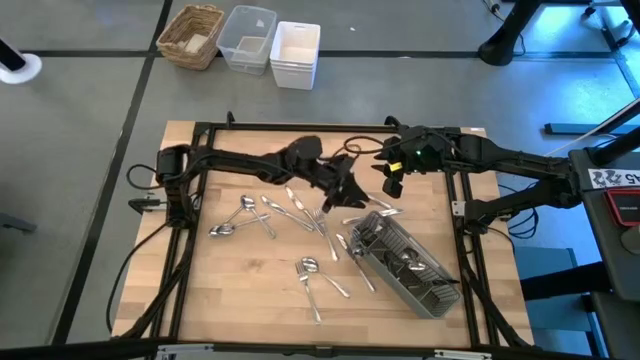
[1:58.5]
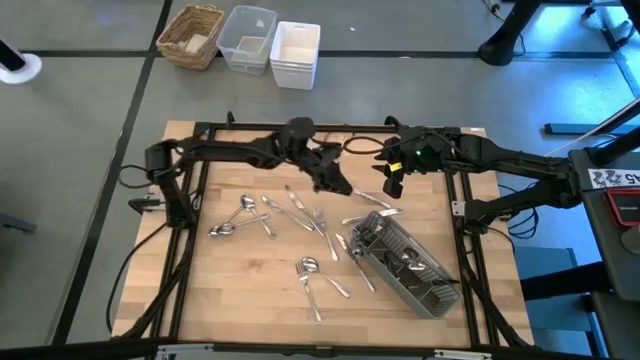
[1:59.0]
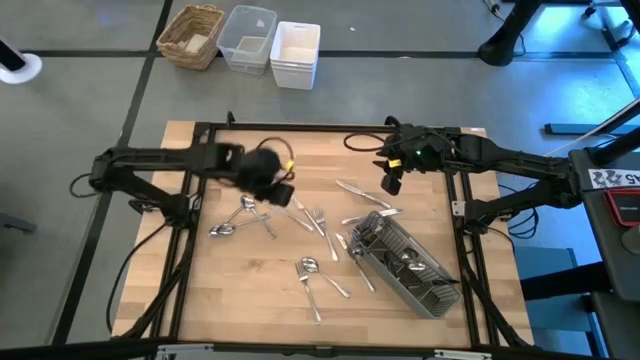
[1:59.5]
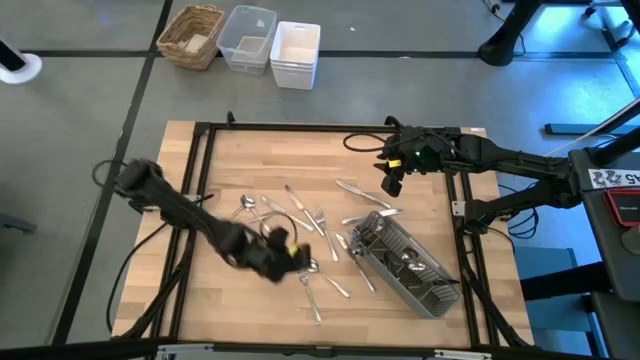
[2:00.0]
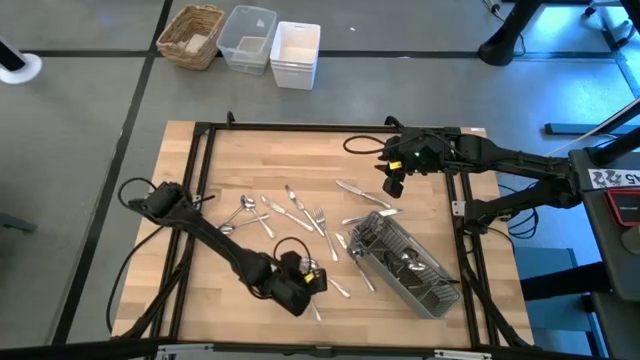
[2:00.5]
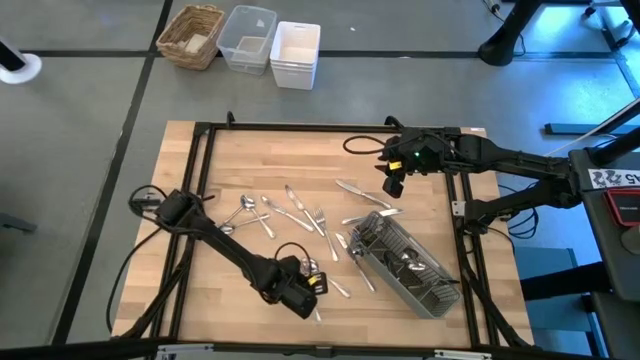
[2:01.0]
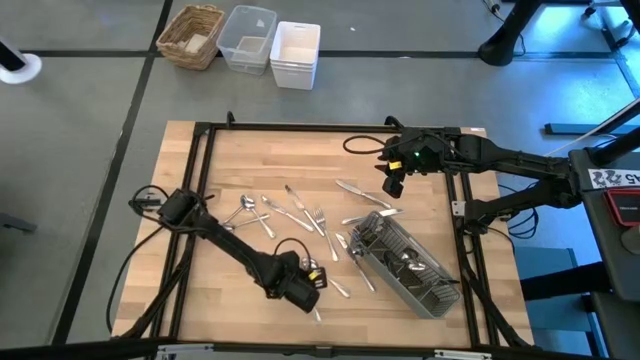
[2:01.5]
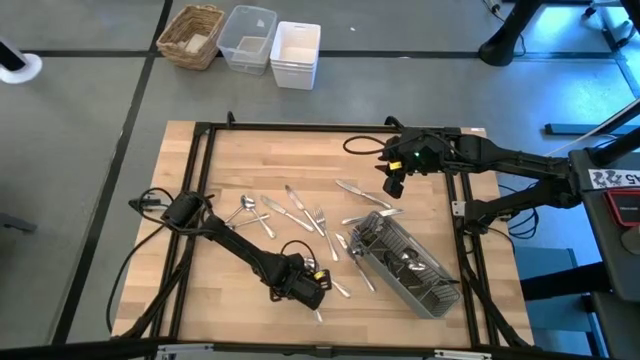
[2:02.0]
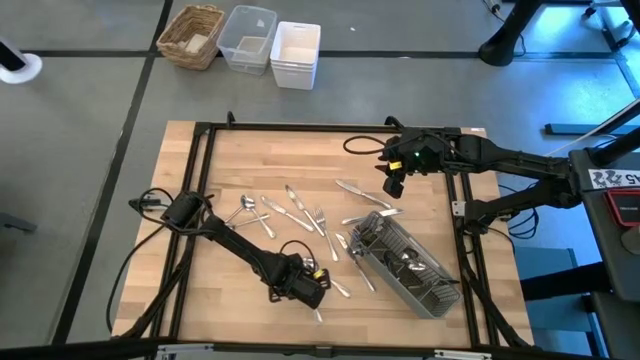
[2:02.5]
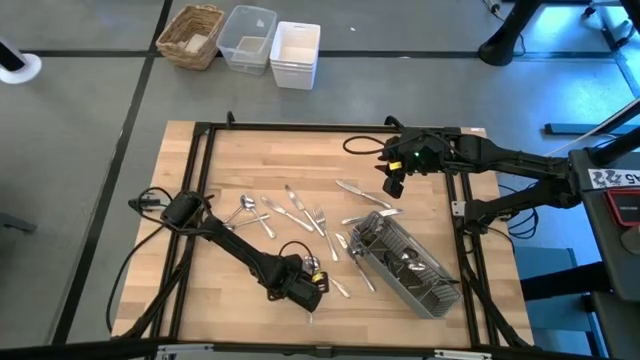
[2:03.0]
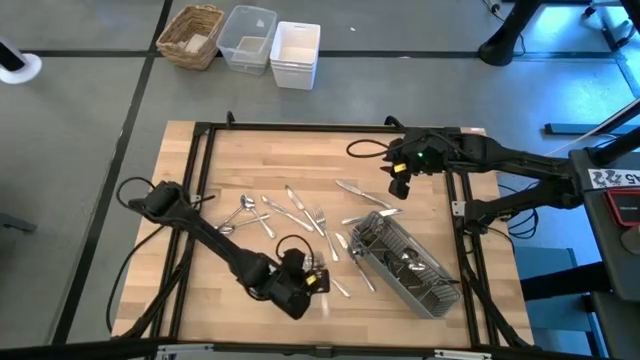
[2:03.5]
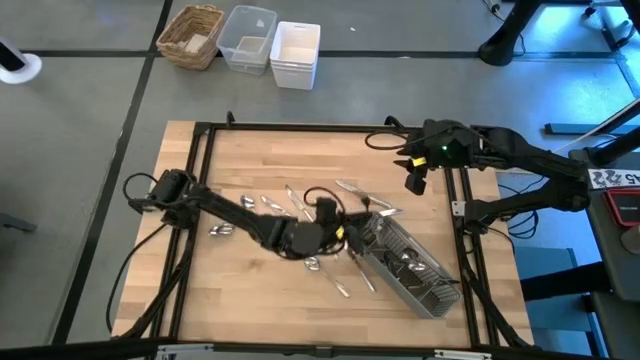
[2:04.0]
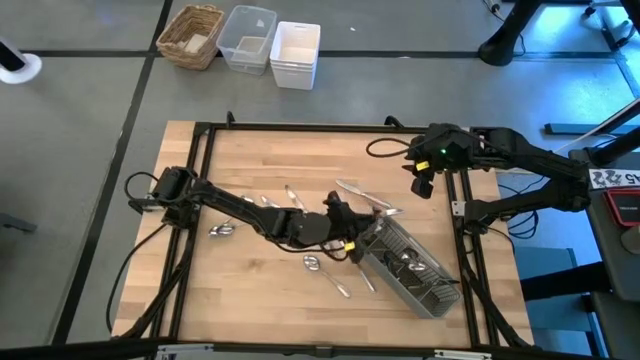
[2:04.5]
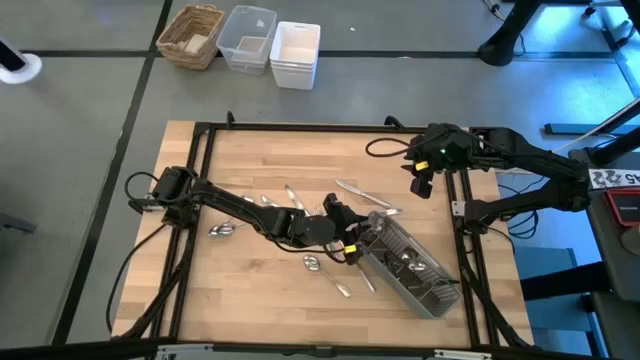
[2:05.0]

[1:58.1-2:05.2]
Task: Sort silverware
Put the silver fork into the gray silverware basket

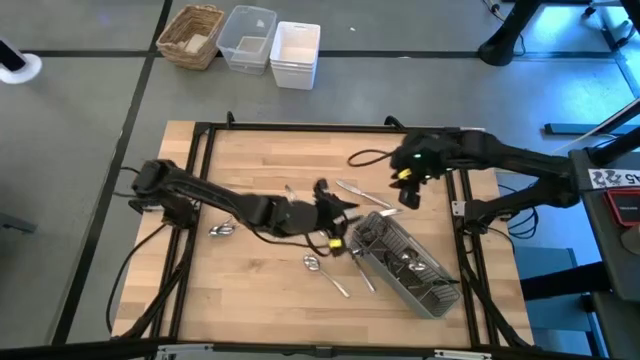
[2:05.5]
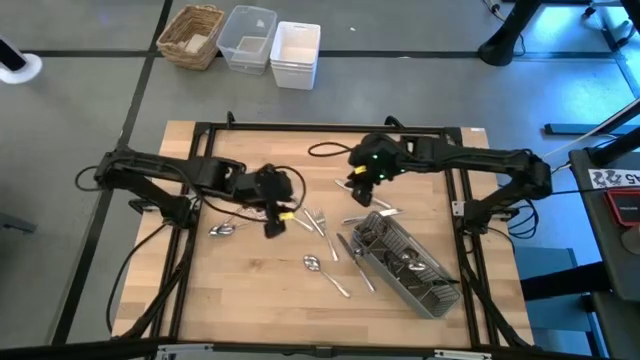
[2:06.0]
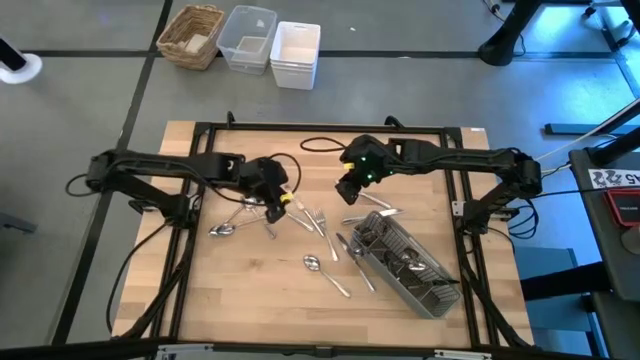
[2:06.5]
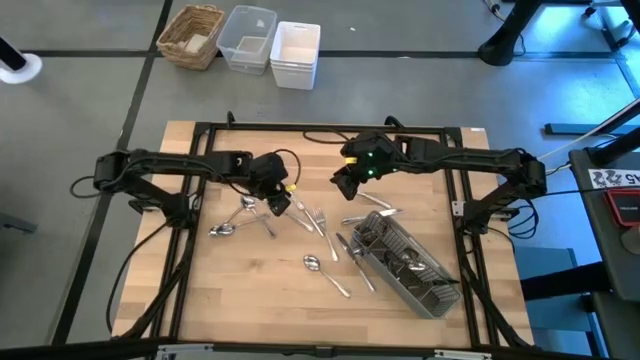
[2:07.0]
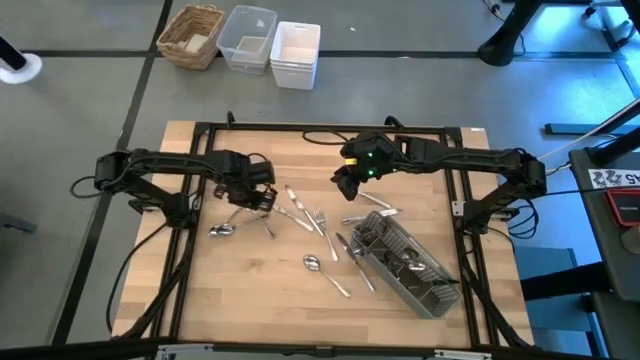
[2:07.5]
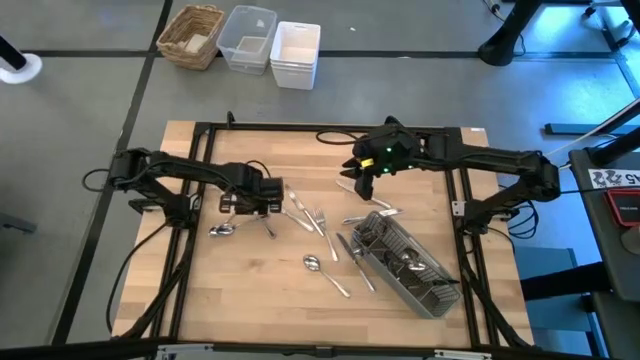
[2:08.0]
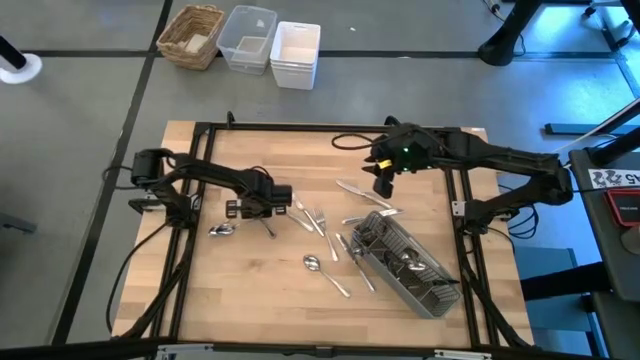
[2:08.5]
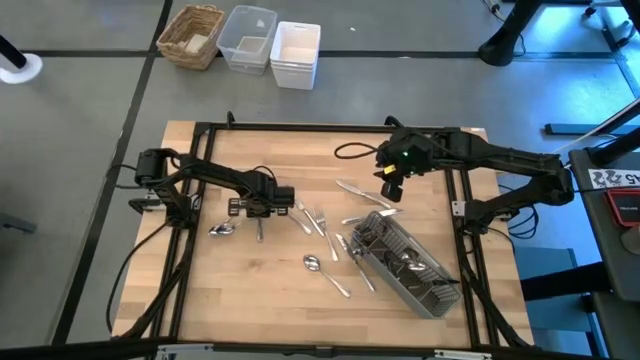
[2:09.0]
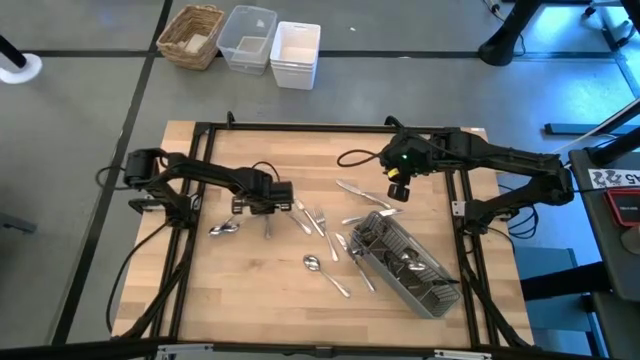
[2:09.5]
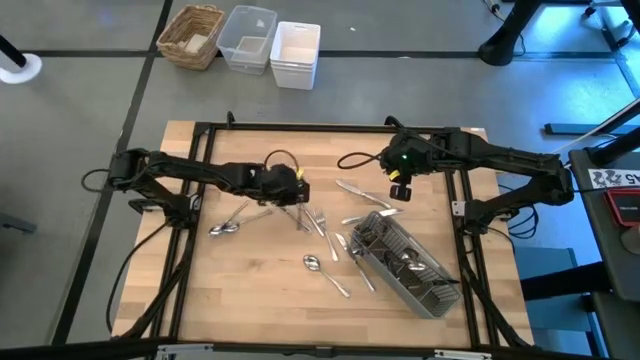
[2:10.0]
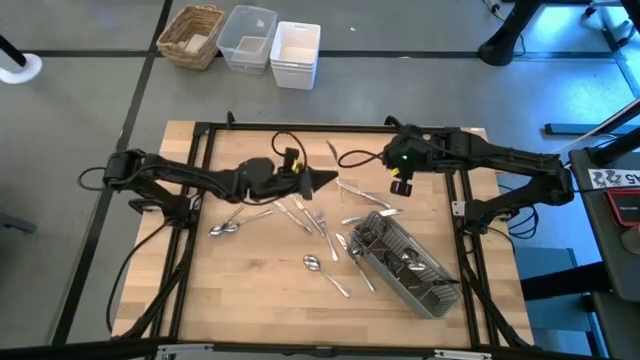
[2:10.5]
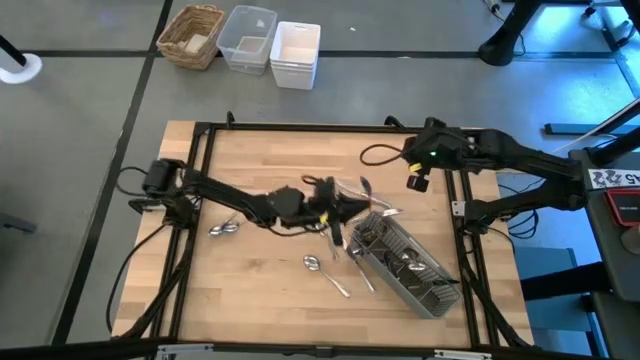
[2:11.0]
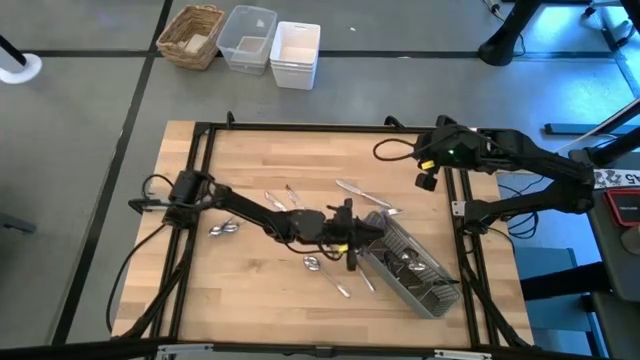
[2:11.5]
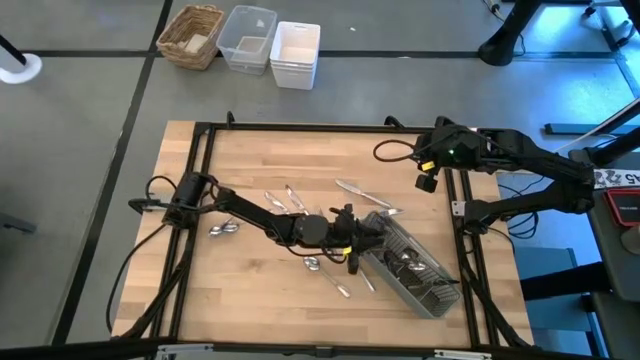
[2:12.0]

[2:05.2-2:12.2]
Put the silver spoon into the gray silverware basket

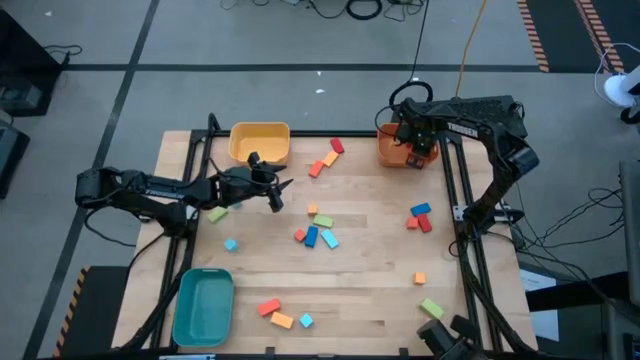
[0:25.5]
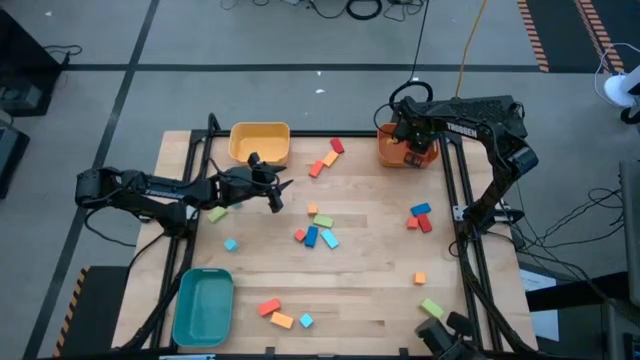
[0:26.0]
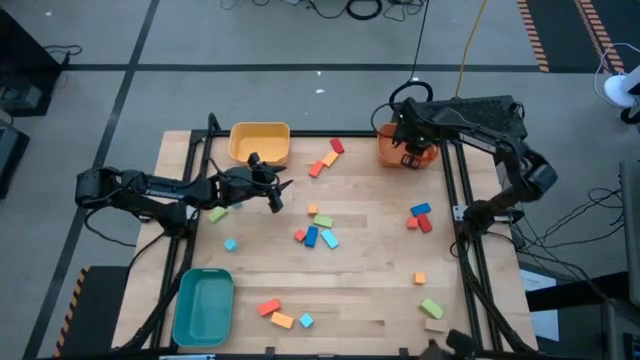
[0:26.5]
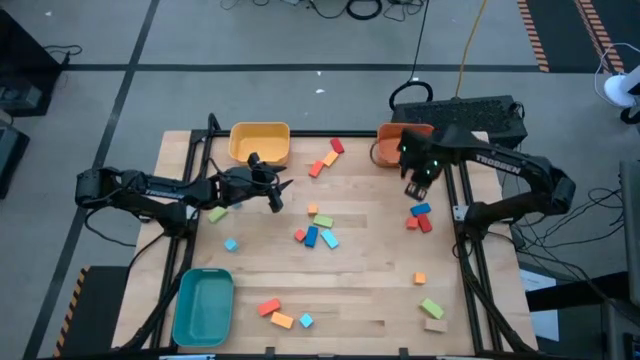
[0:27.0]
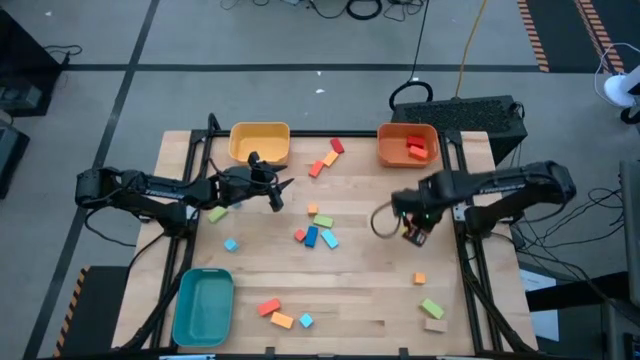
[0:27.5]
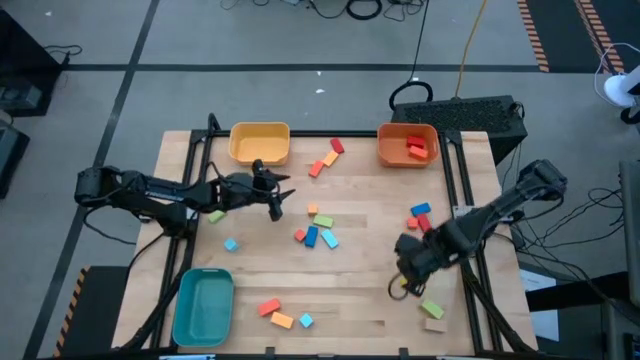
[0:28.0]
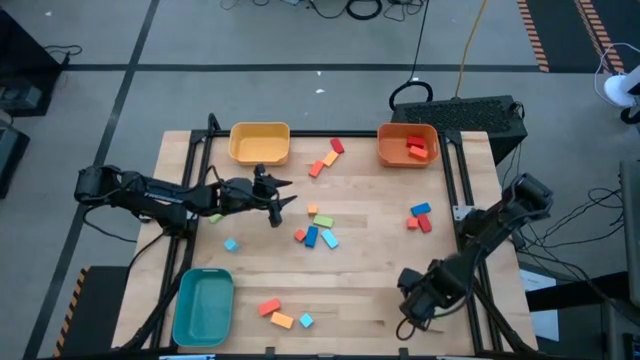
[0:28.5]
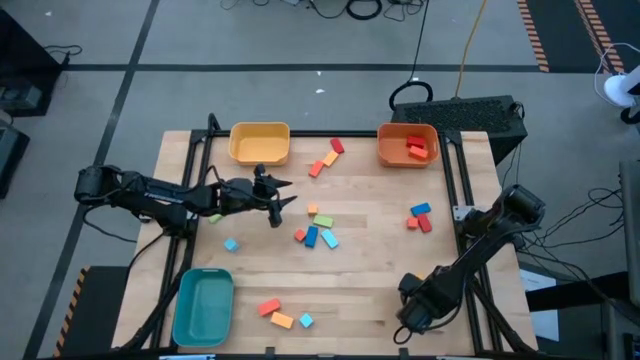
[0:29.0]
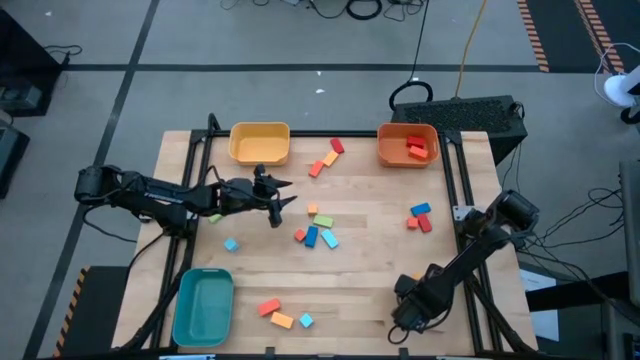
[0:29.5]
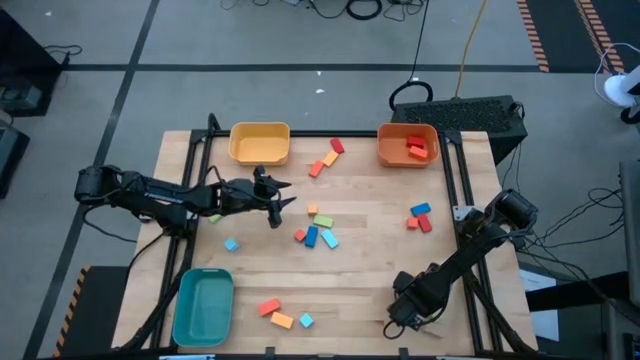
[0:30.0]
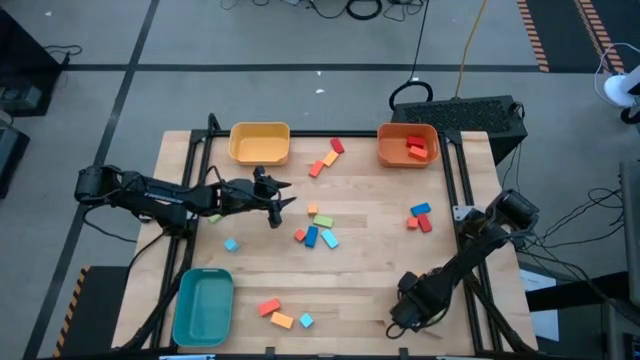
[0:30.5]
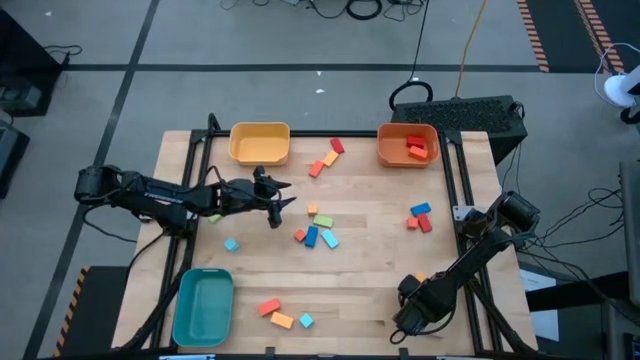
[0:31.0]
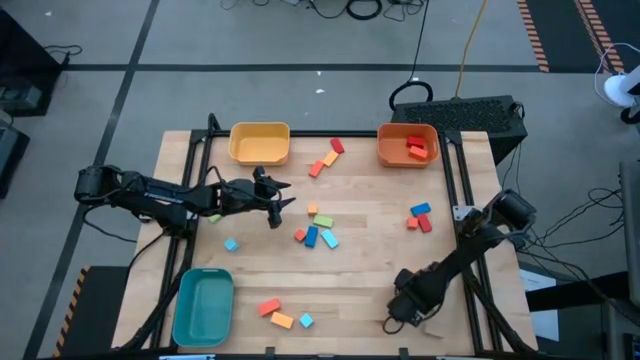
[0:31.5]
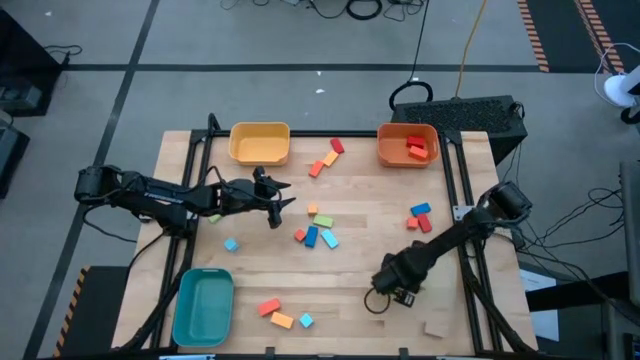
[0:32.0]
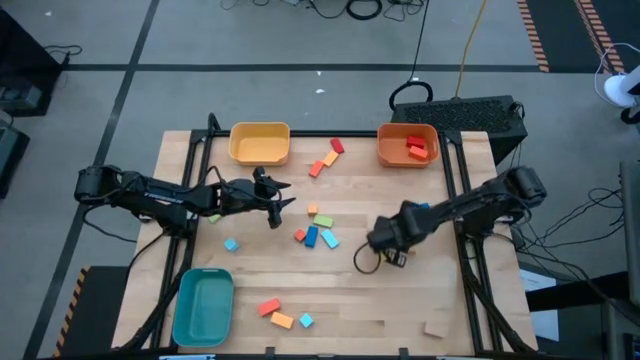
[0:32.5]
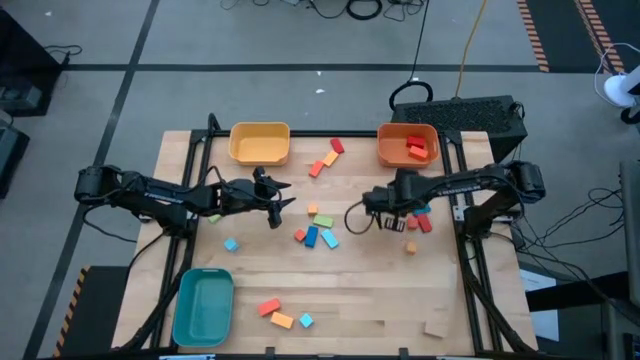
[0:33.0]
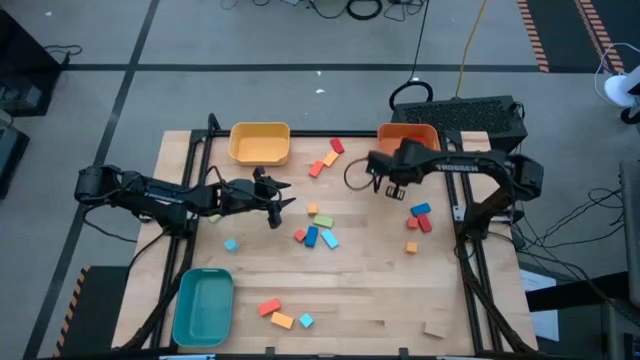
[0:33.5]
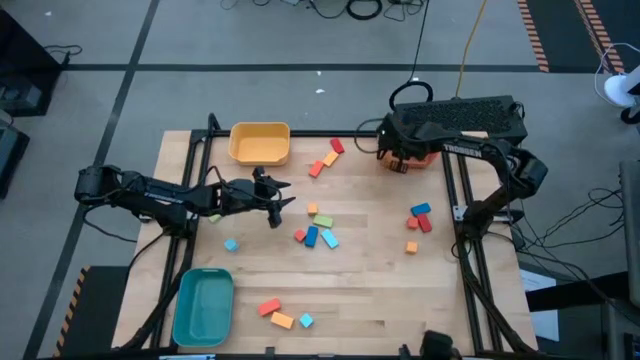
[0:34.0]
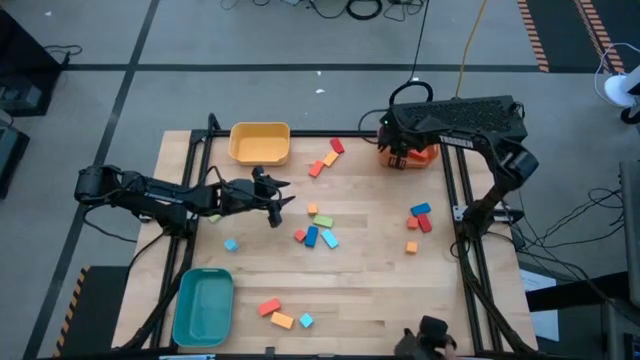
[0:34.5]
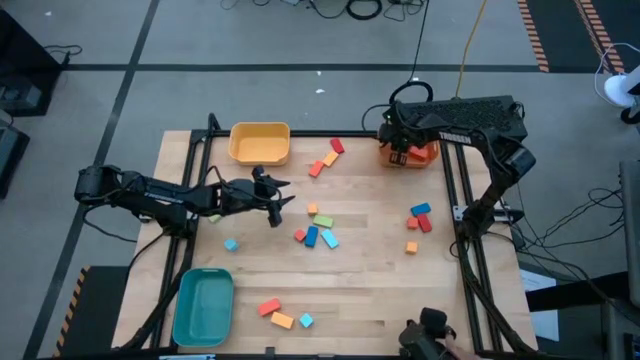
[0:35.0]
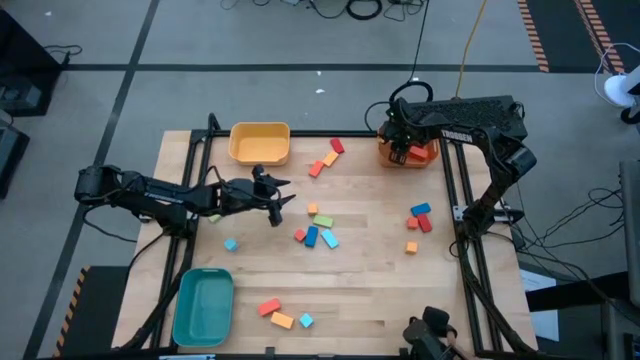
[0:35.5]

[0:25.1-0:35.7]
Task: Sort blocks by size
Put the large green block into the orange bin
